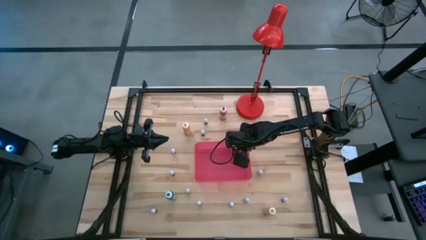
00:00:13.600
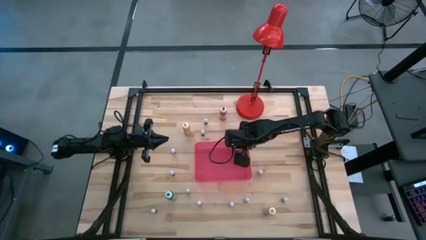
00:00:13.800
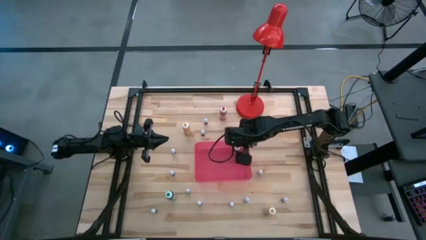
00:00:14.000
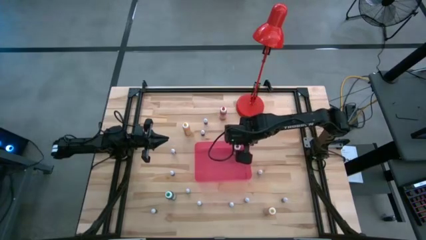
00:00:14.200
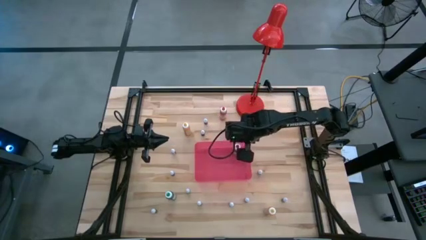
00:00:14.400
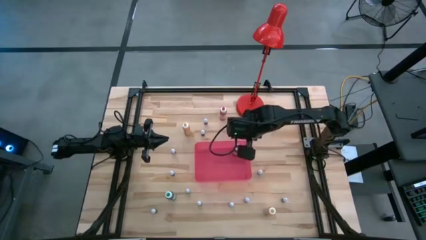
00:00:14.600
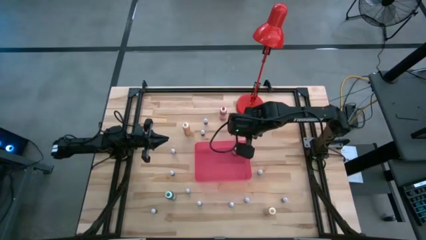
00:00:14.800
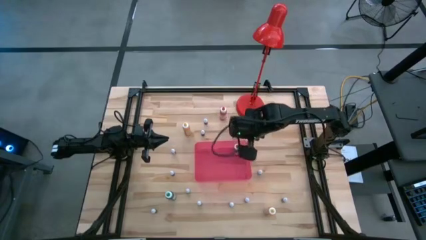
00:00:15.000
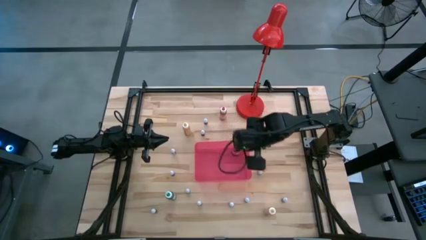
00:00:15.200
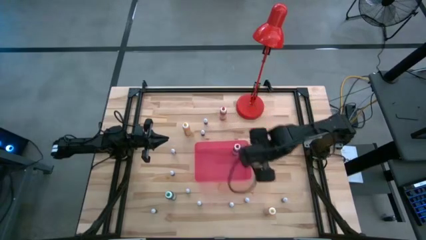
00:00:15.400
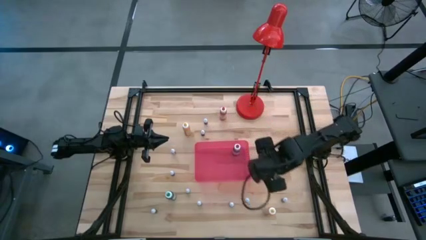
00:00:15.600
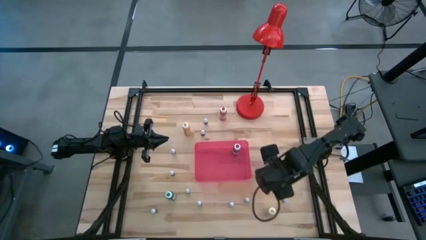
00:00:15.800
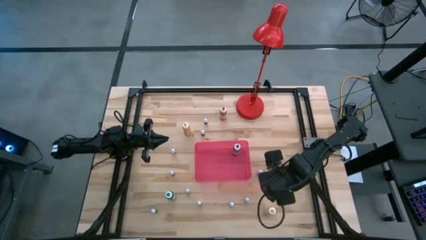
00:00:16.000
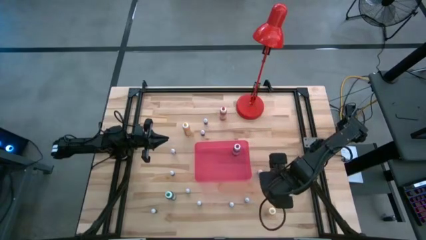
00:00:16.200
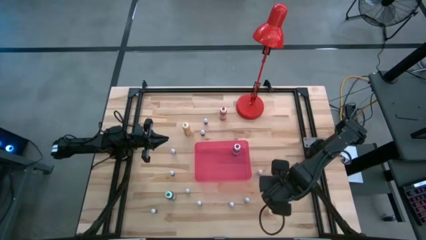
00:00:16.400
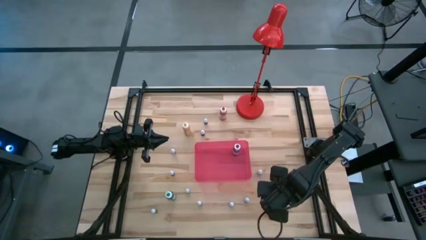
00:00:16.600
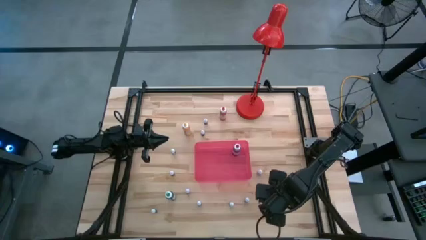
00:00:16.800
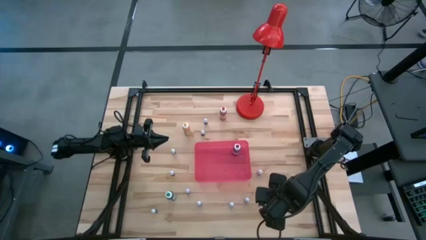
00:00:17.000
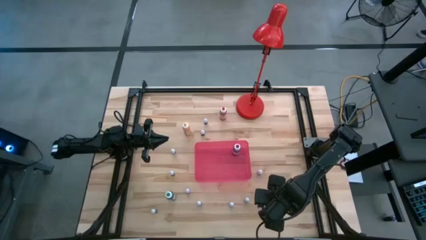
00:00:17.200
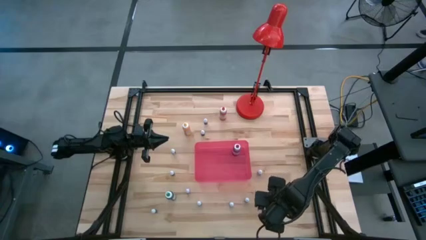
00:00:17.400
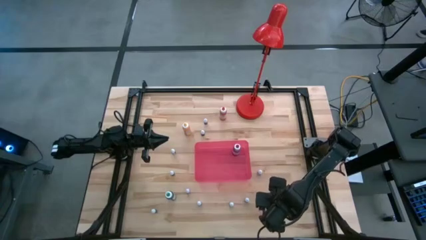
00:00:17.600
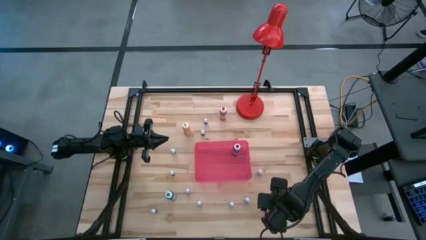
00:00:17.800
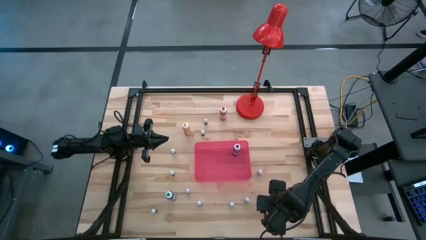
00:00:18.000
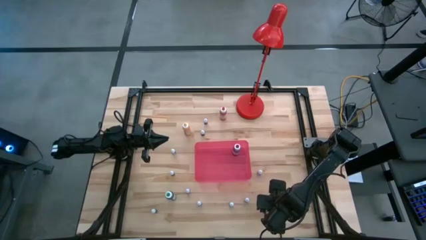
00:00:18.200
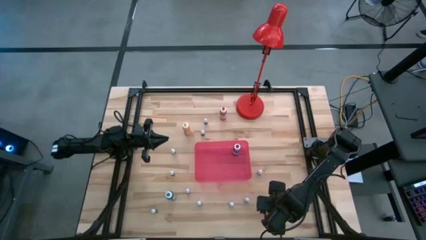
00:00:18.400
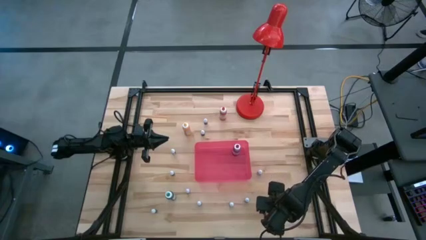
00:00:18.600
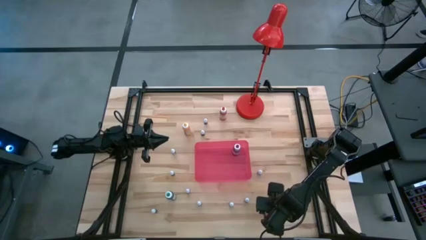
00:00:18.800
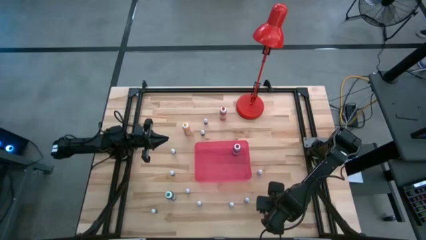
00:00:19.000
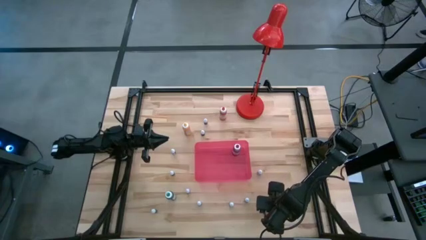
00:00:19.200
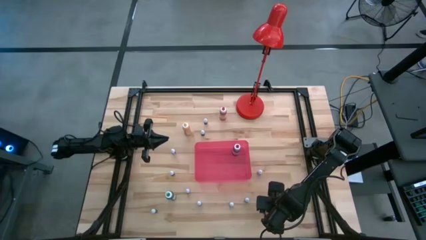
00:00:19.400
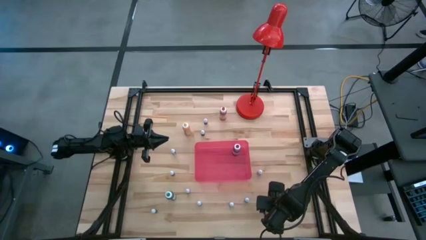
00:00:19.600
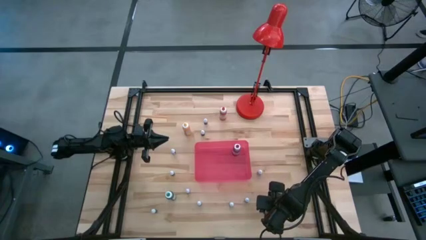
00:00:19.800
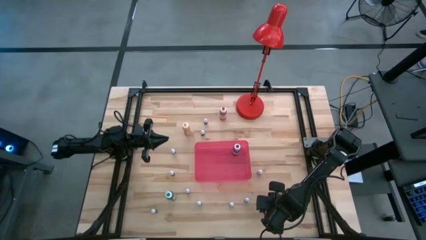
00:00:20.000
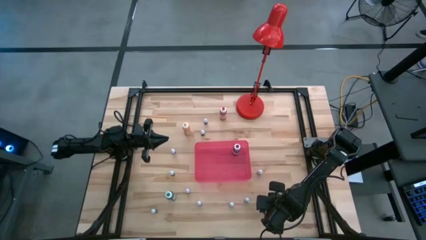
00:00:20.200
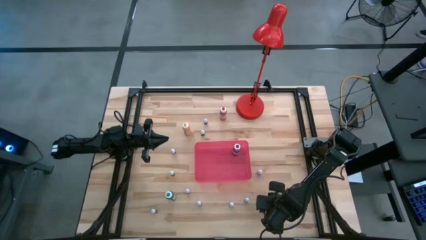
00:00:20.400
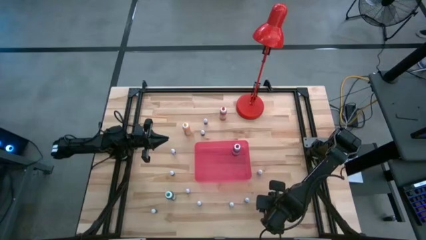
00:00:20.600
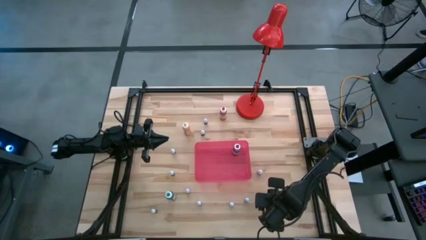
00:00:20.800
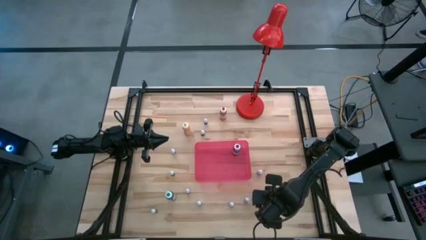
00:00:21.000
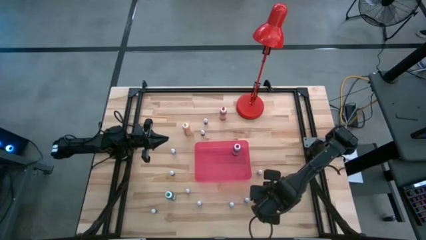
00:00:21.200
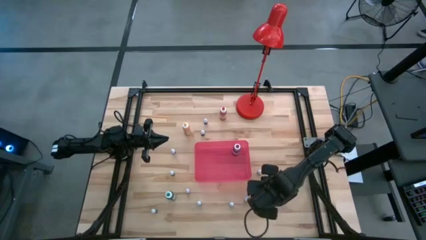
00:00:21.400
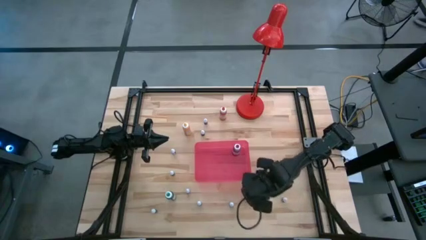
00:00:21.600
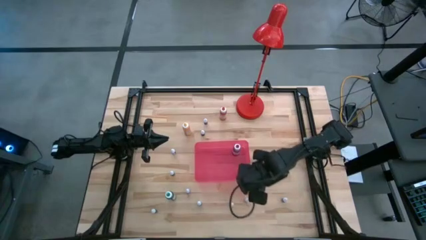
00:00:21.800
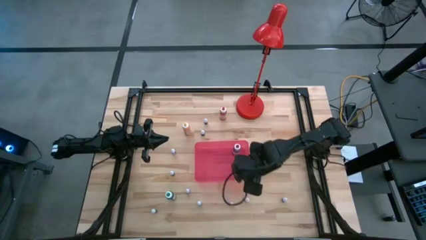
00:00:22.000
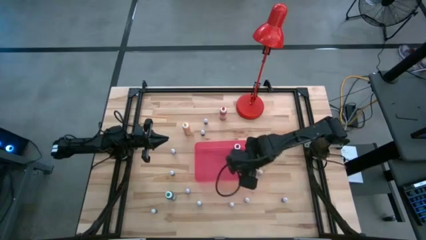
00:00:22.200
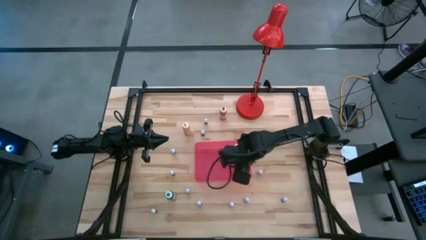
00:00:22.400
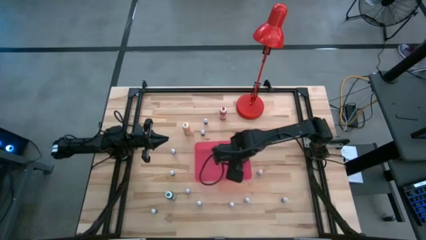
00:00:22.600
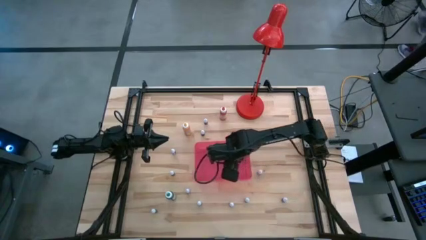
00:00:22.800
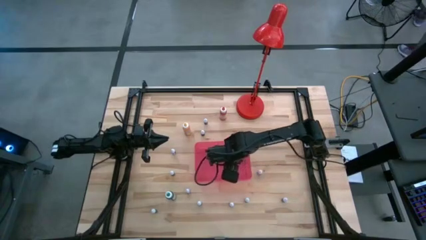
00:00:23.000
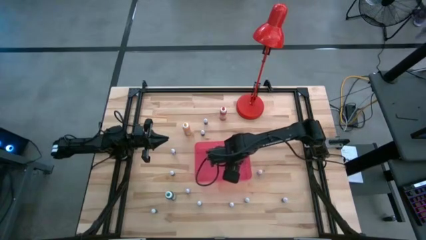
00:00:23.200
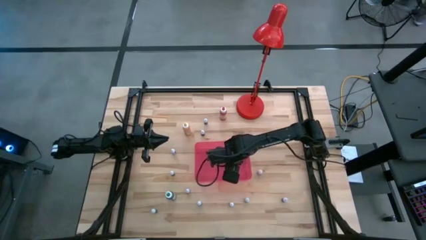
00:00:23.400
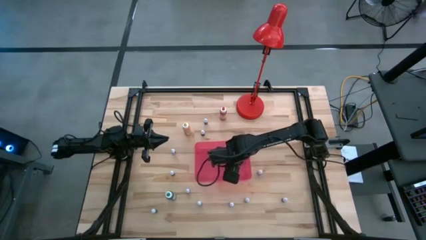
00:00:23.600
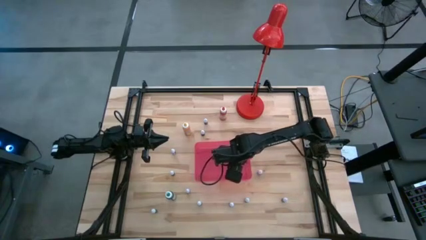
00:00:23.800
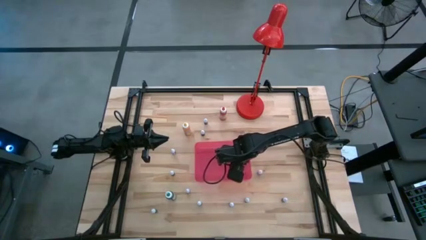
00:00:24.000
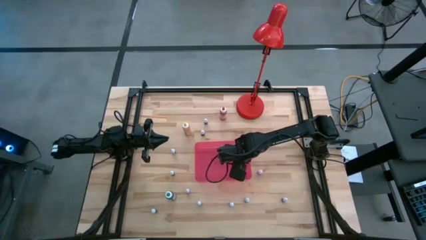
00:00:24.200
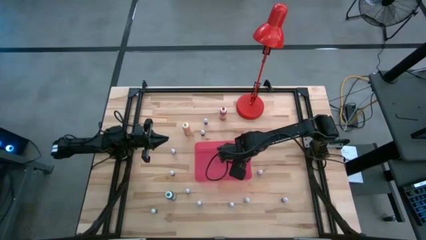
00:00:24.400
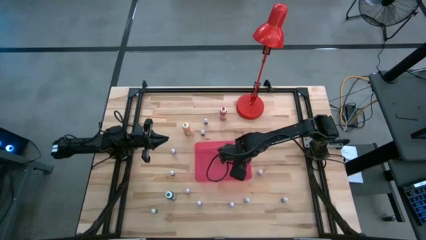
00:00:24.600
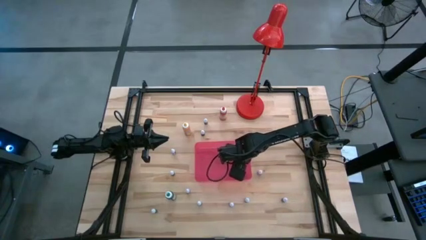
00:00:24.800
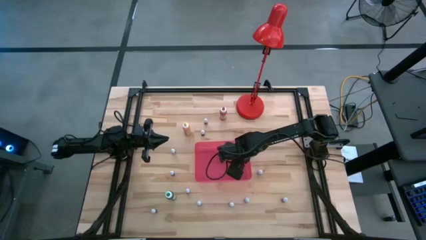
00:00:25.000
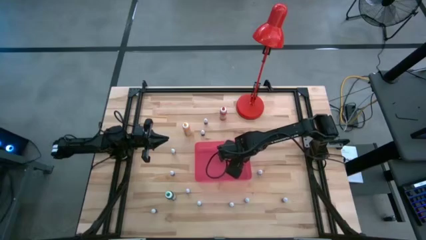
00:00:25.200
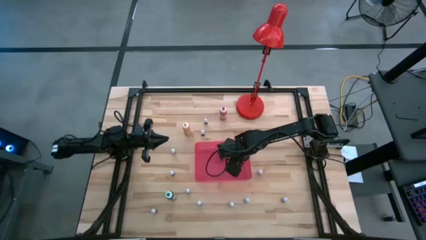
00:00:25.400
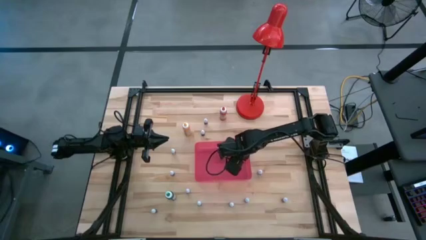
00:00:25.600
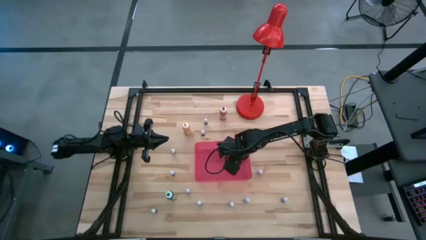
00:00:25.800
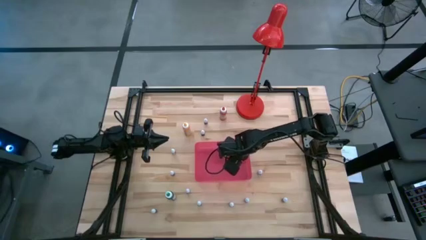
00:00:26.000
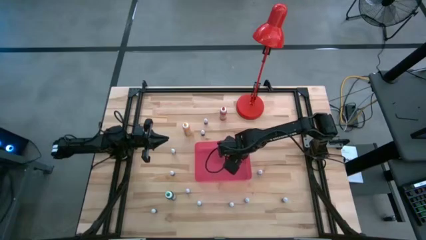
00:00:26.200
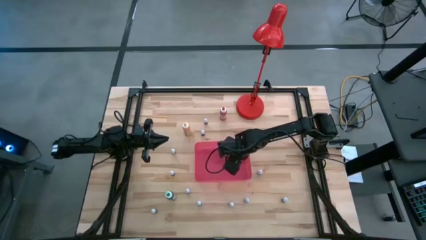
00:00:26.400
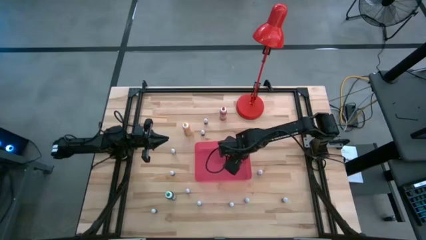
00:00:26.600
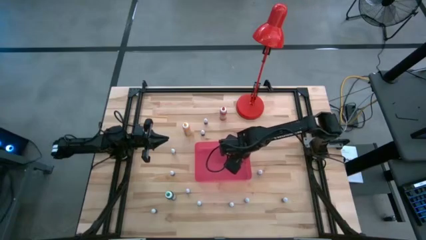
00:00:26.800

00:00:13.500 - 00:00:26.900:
Task: Pick & Place food coloring
Put the large yellow food coloring bottle into the red bin
